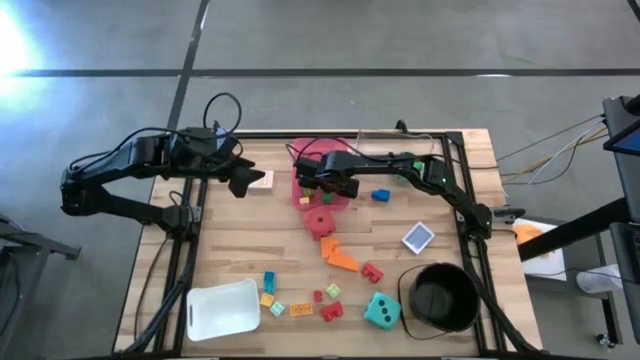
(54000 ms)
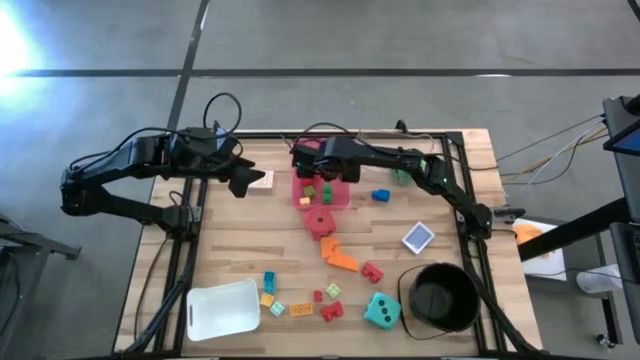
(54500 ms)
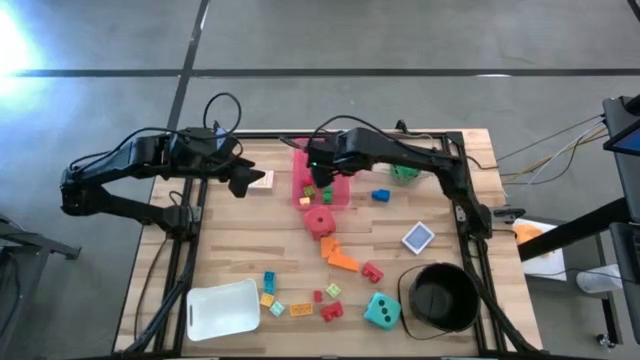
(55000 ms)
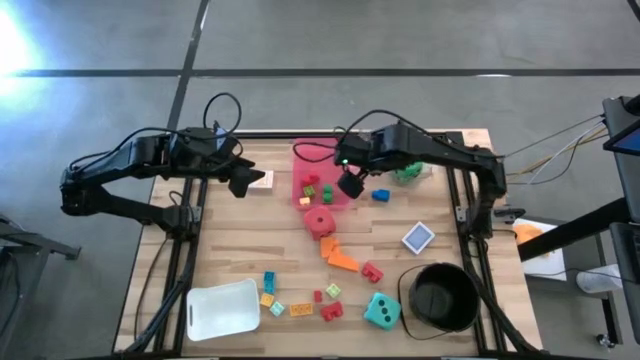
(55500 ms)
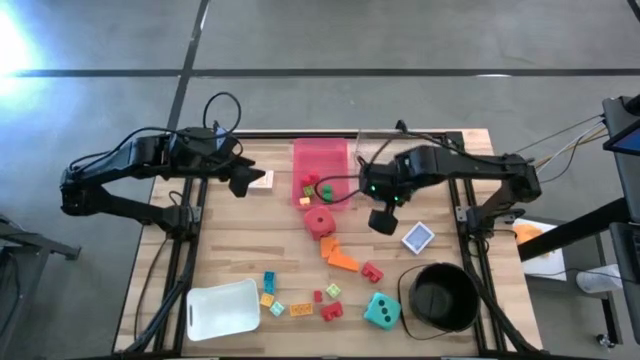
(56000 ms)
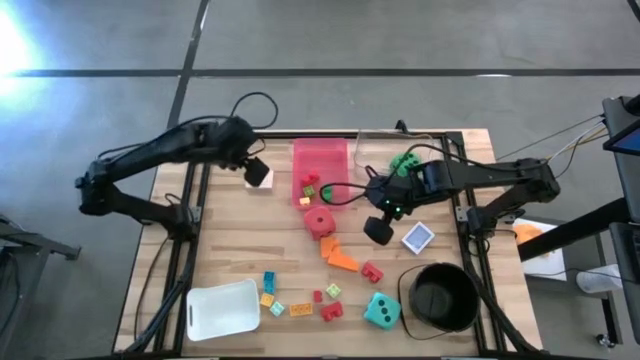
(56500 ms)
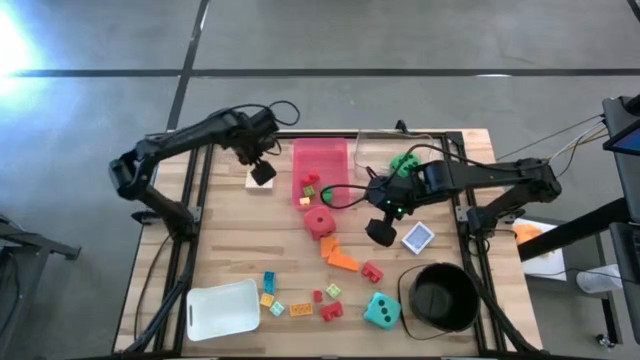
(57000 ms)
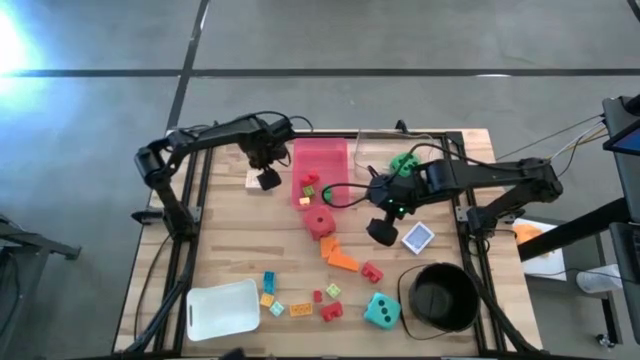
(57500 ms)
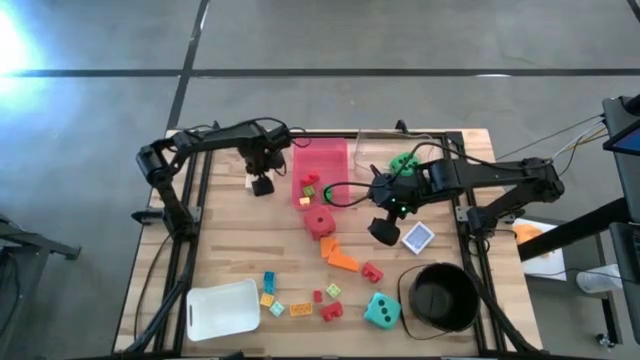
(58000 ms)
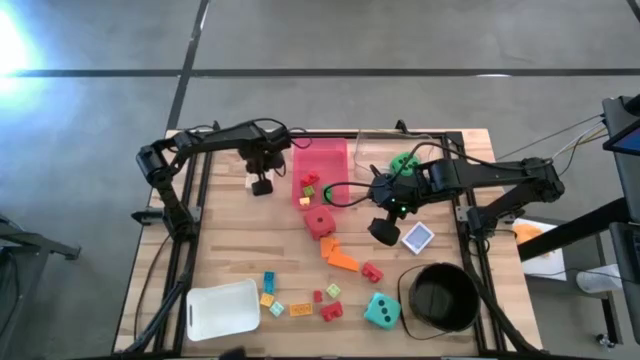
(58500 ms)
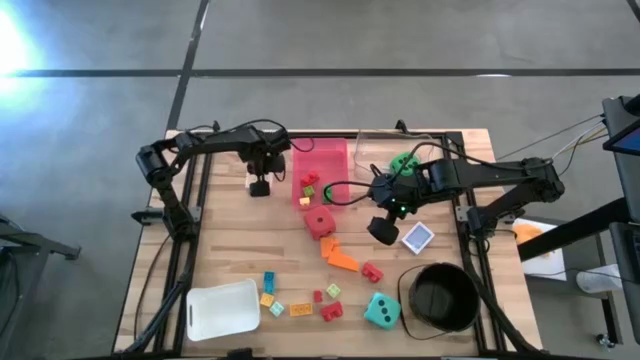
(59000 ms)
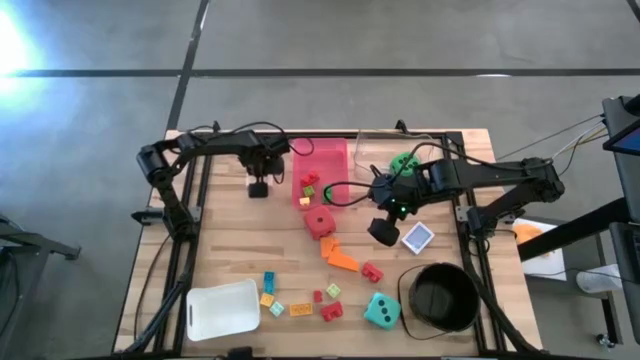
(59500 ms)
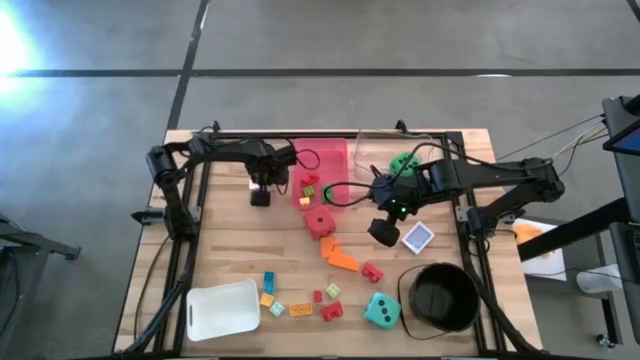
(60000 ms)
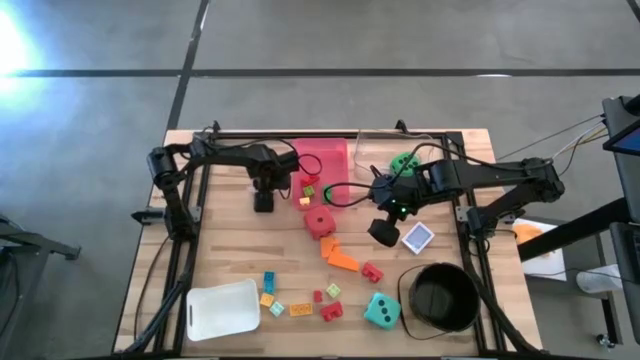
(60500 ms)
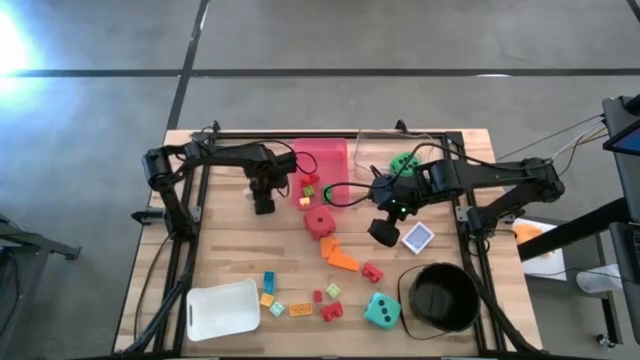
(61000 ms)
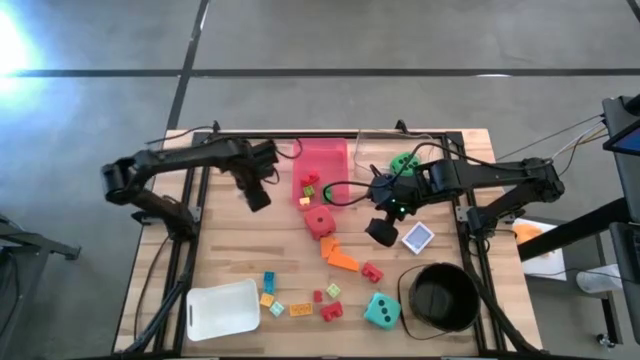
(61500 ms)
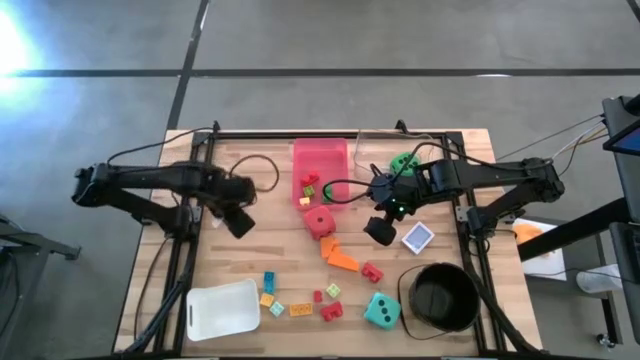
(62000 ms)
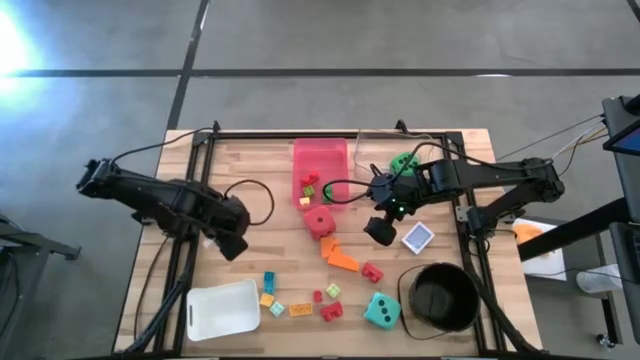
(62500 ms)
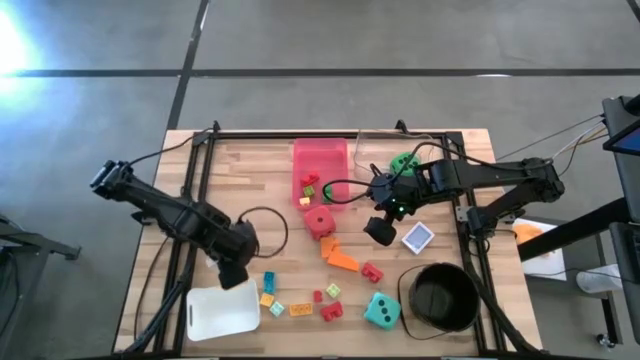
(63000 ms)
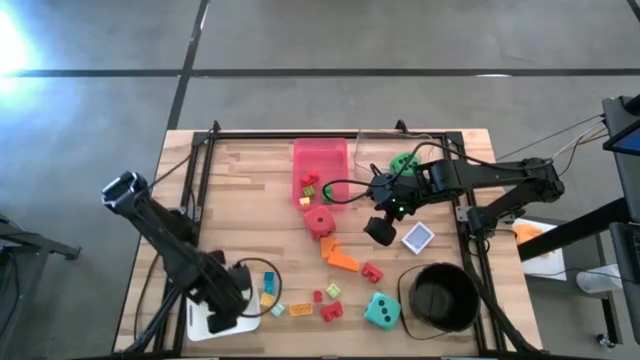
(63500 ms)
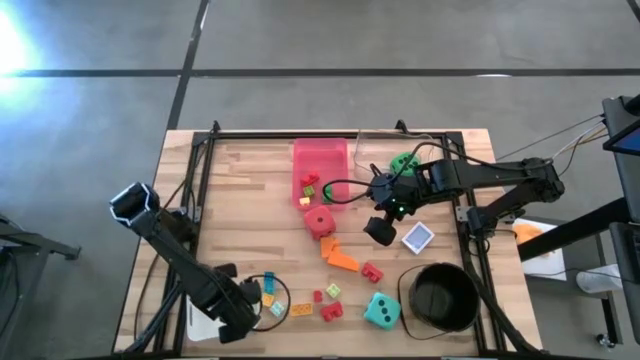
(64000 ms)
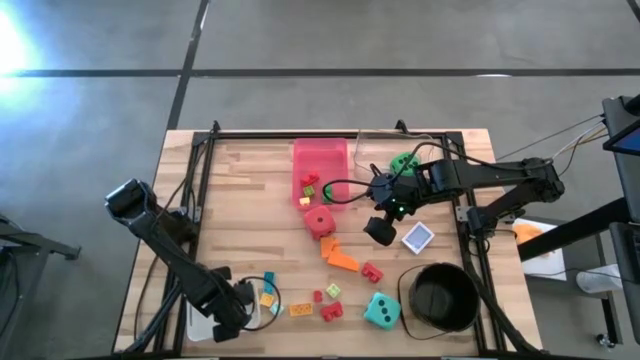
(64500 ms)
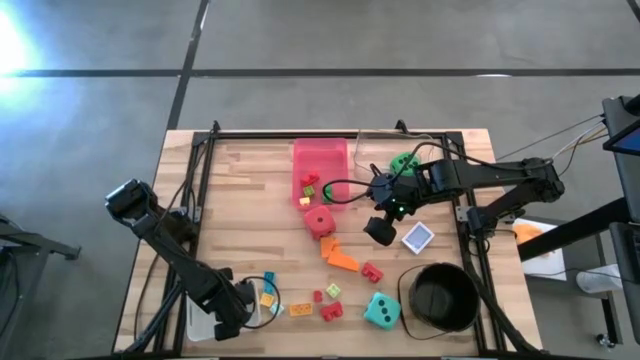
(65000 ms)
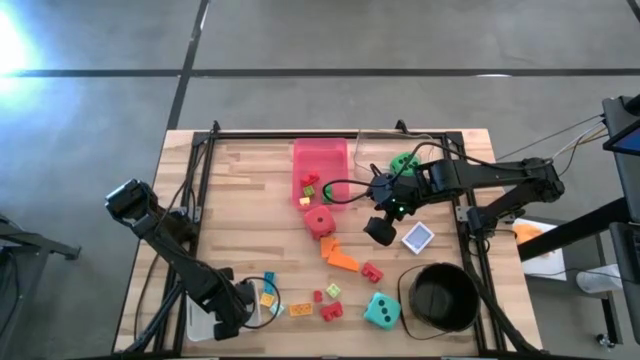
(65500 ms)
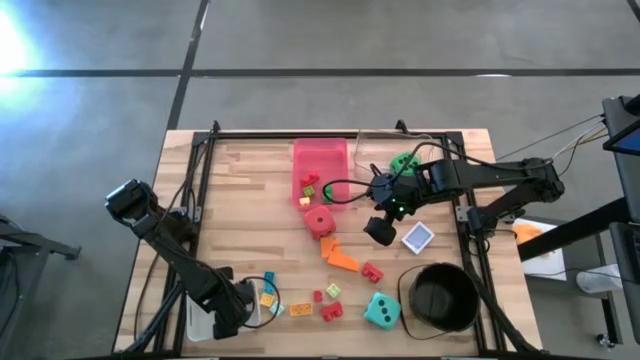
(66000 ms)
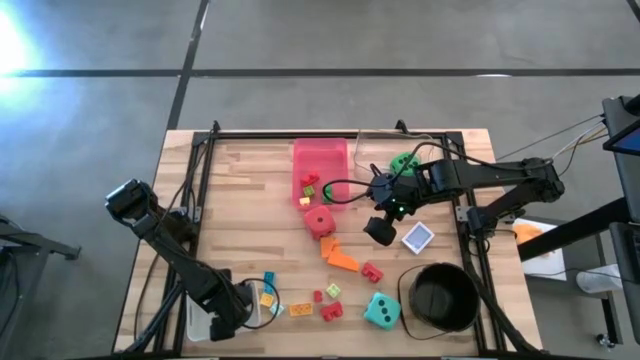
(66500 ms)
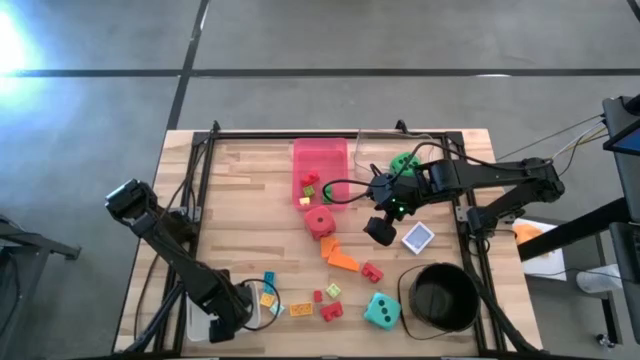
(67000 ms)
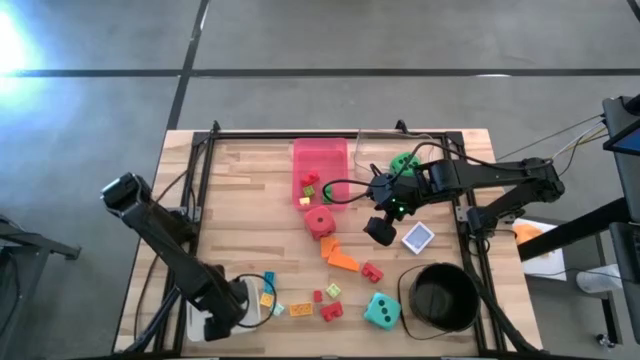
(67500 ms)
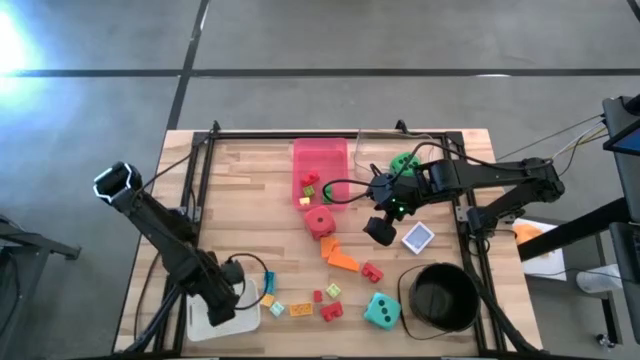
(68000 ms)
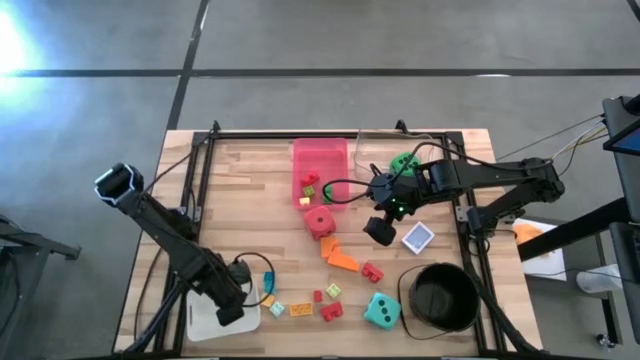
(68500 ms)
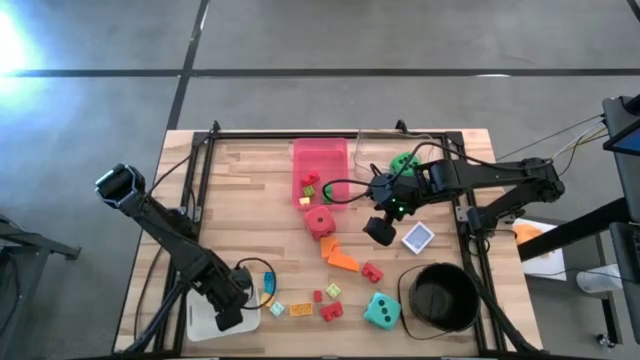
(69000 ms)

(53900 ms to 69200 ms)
Task: Pick & Place Toys
Put the orange deck of cards into the white bin

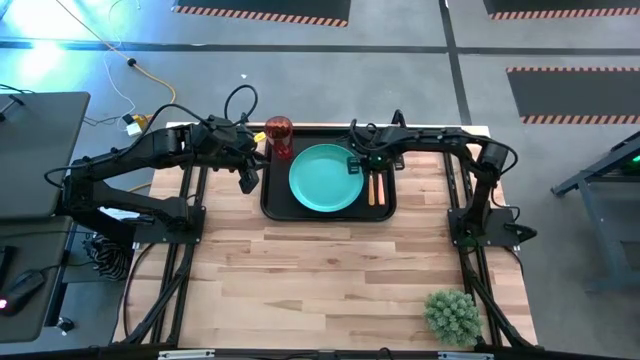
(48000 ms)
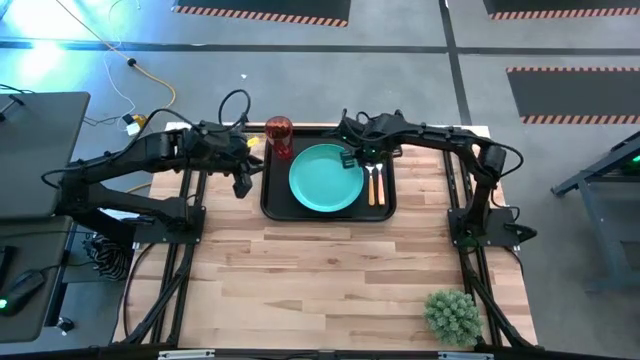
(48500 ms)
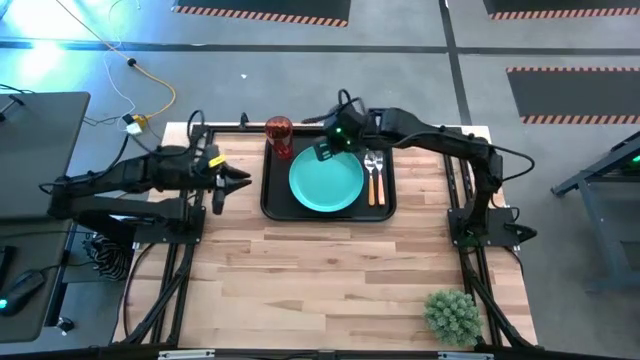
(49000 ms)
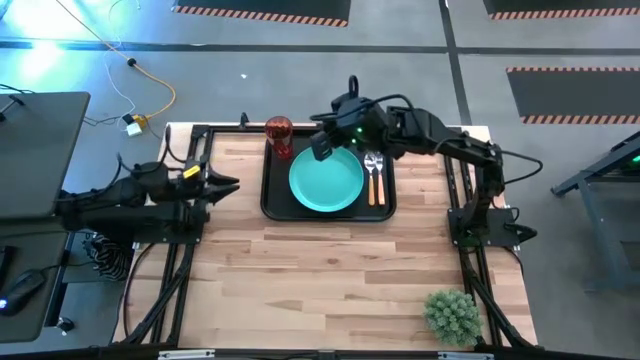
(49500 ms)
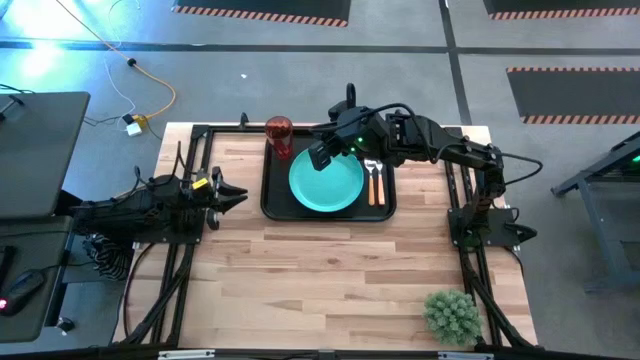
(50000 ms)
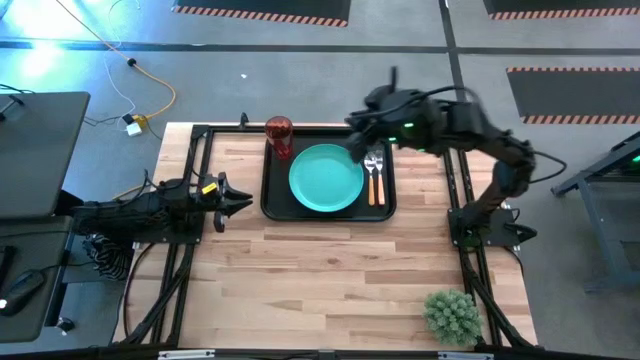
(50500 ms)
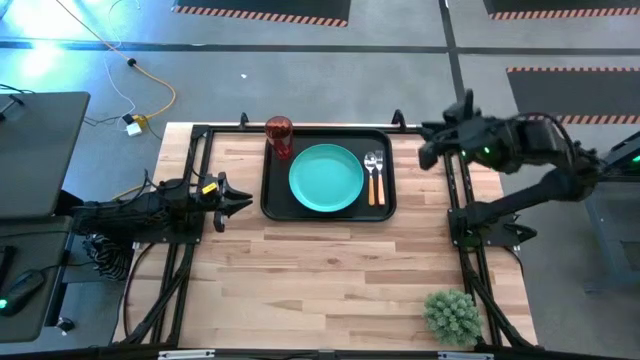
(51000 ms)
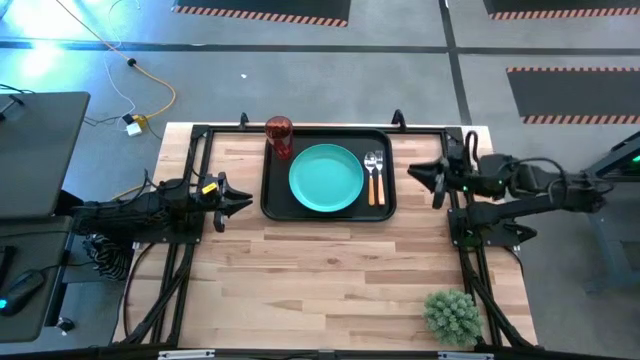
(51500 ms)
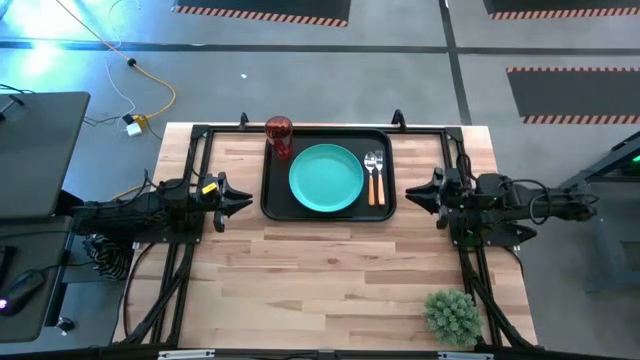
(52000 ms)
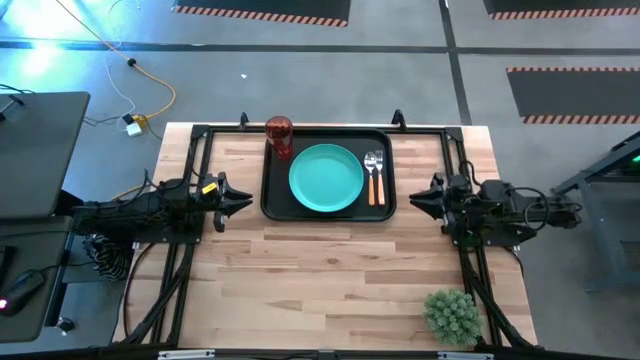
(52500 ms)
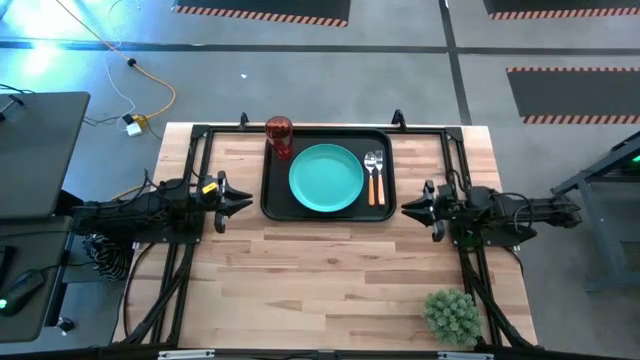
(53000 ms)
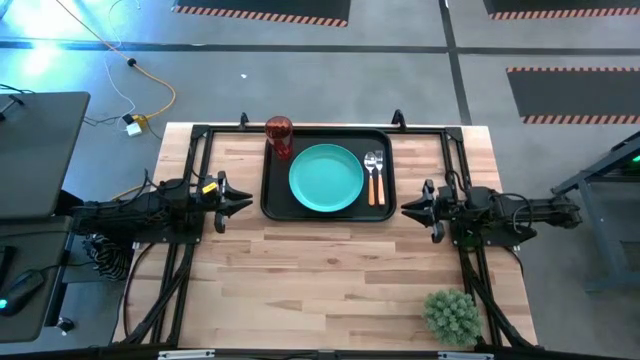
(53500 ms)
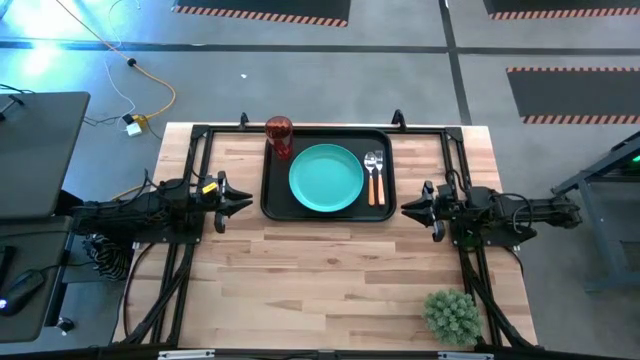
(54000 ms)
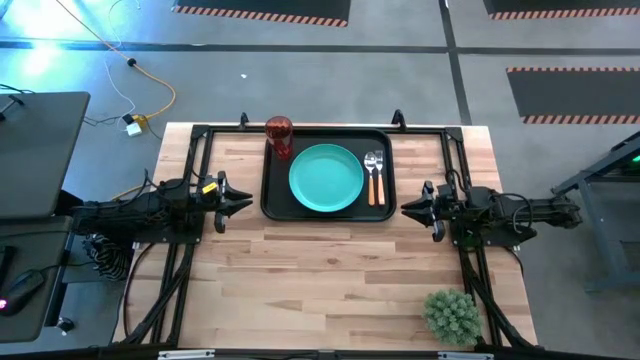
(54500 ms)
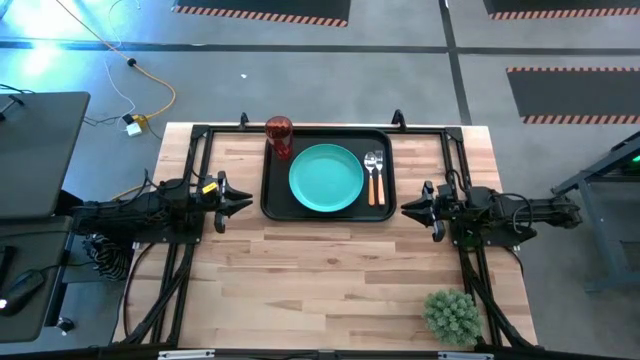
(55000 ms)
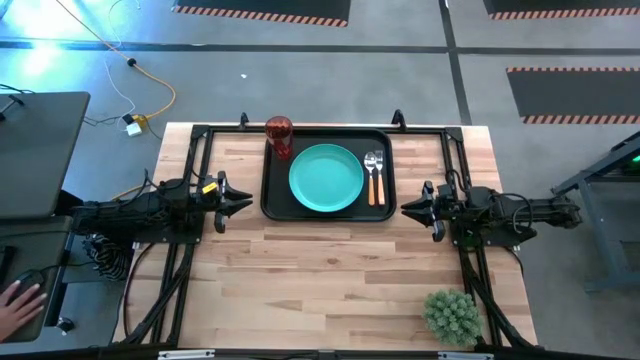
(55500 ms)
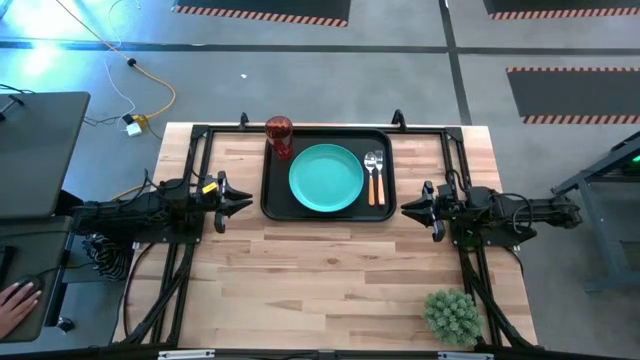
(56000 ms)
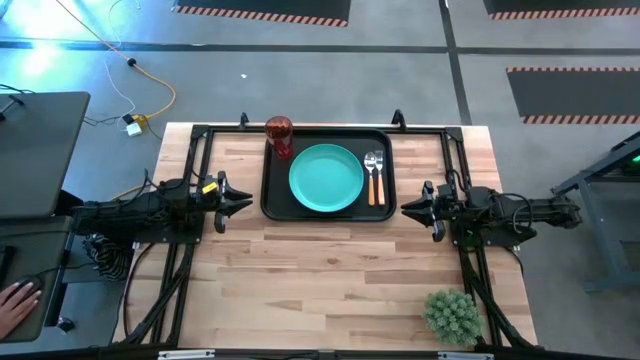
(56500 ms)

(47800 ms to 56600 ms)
Task: Pick and place plate/cup/fork/spoon on tray
Return to Home Position
